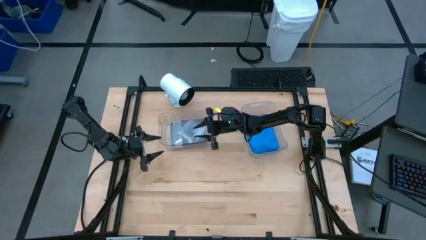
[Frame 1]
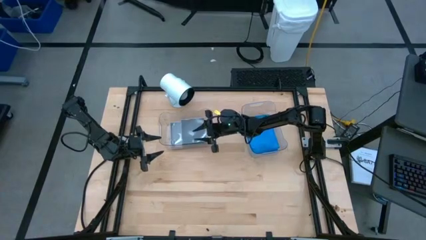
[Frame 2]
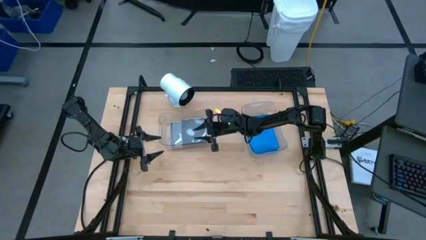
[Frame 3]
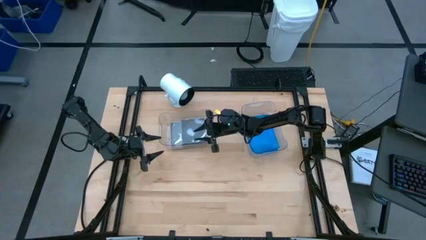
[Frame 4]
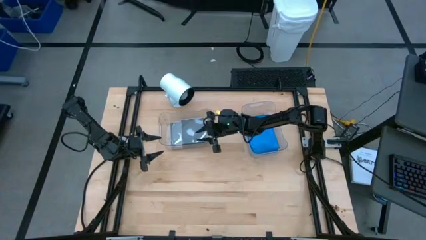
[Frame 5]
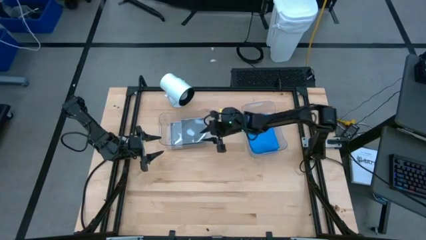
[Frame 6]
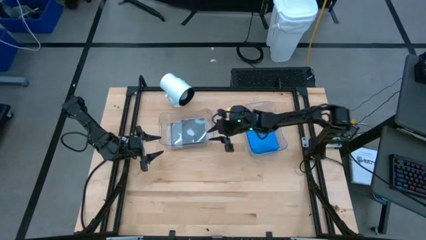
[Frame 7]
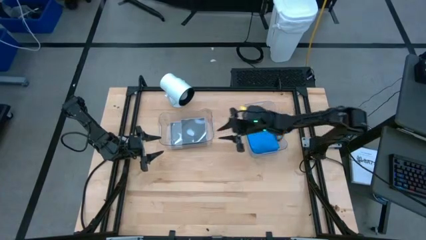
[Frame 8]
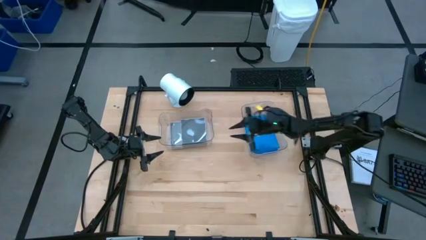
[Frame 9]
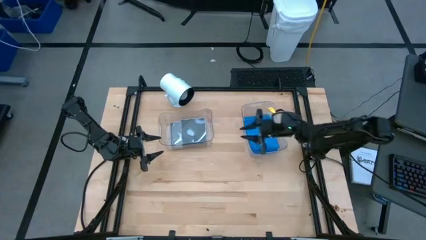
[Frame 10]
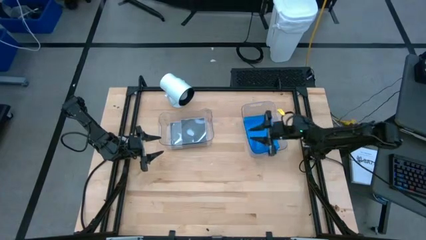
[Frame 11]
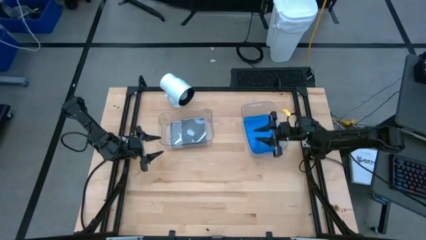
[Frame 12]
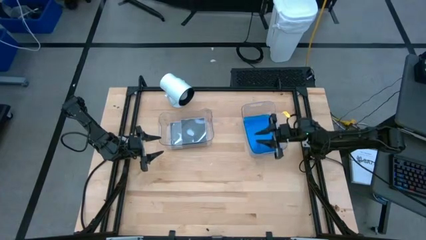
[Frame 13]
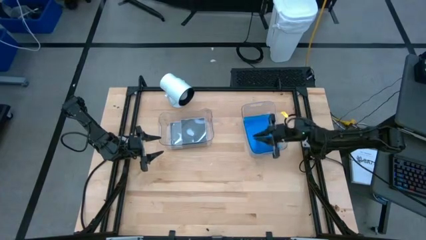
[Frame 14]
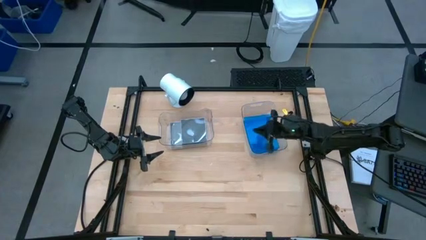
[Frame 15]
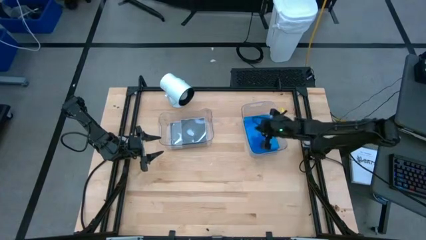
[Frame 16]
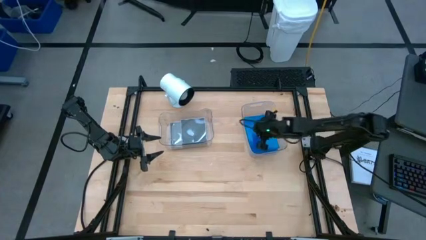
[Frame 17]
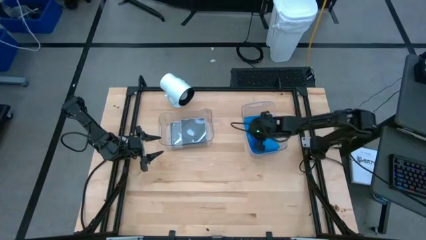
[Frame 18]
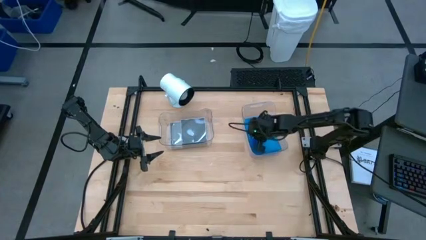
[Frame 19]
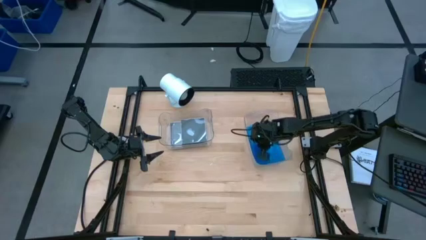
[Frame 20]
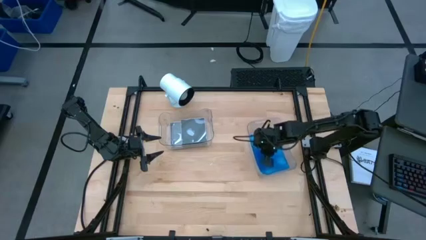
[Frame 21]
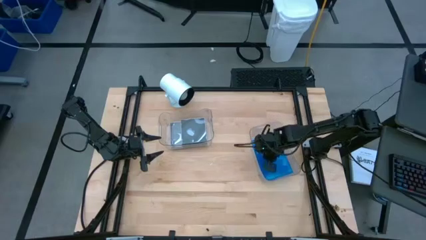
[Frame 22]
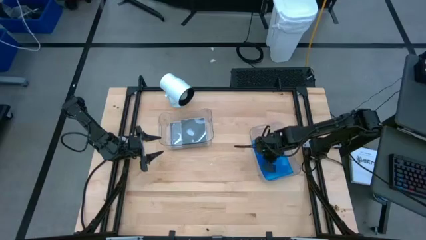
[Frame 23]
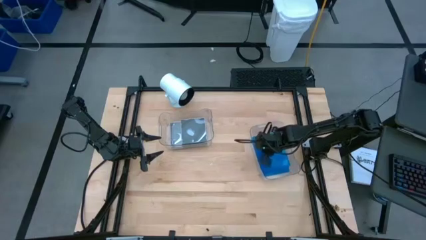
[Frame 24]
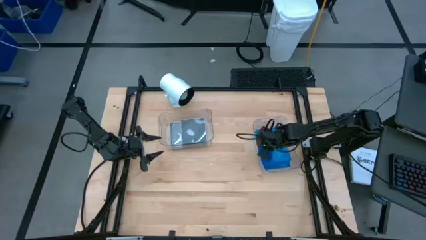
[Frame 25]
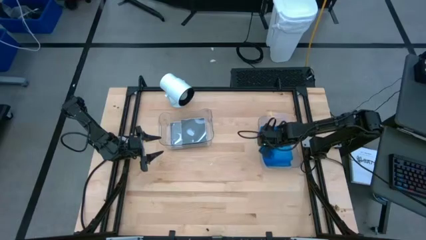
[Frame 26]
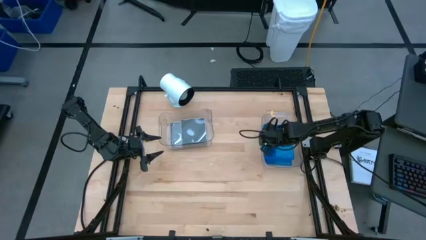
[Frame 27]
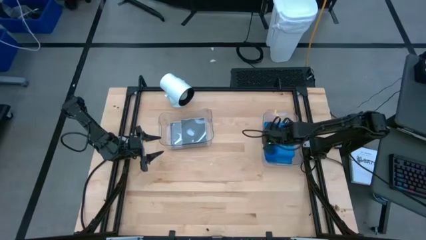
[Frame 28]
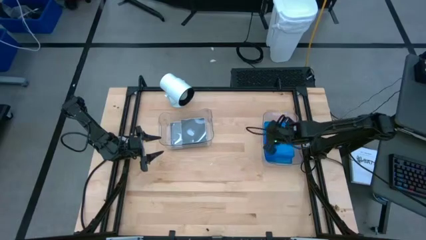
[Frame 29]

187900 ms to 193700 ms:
Task: Pick & place jewel cases by type
Move the right transparent bin to the right

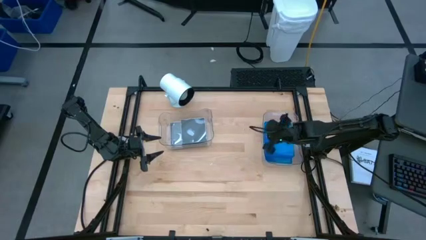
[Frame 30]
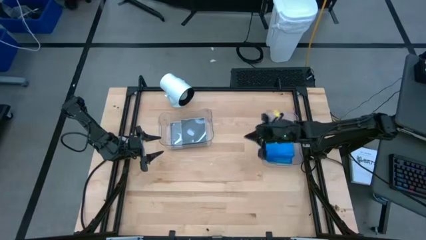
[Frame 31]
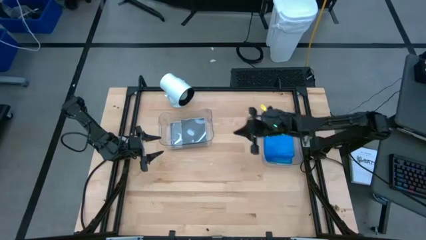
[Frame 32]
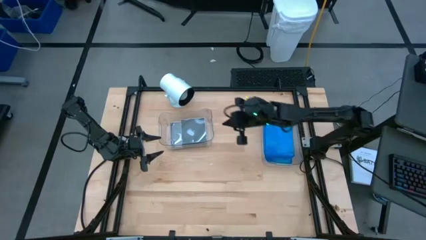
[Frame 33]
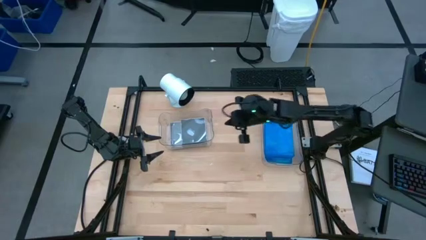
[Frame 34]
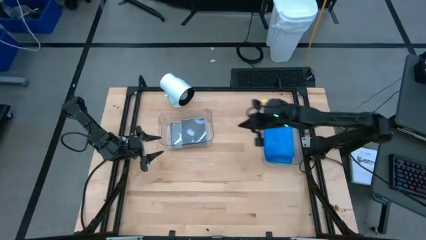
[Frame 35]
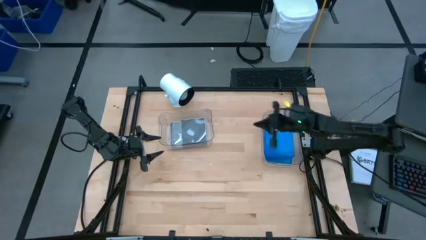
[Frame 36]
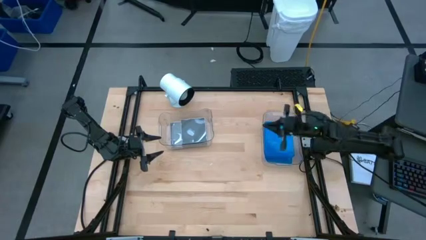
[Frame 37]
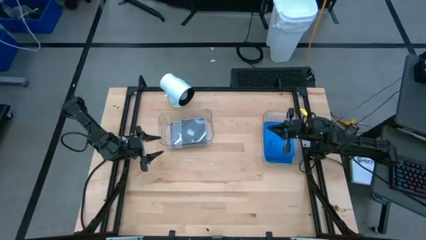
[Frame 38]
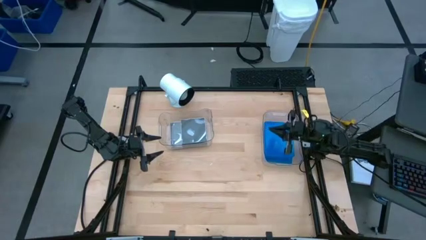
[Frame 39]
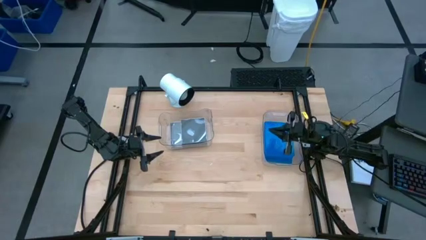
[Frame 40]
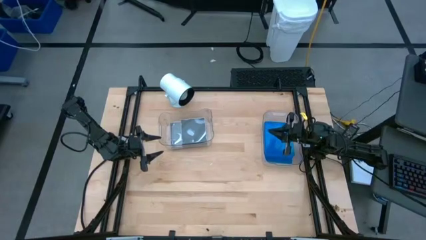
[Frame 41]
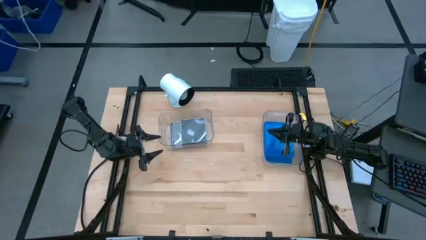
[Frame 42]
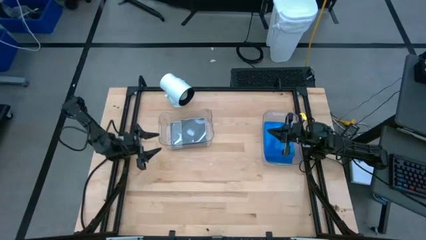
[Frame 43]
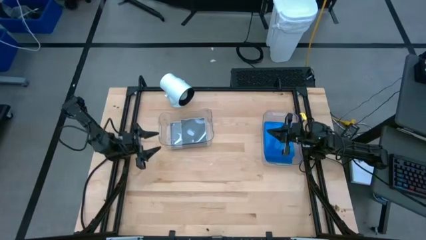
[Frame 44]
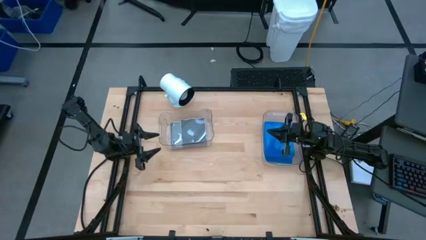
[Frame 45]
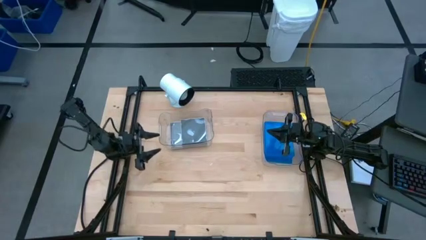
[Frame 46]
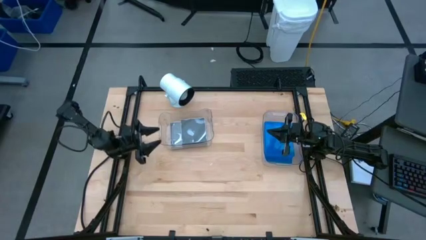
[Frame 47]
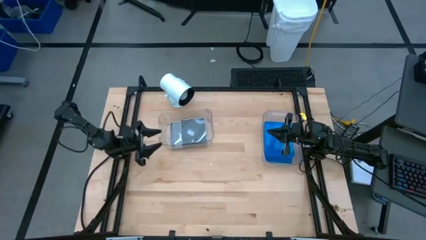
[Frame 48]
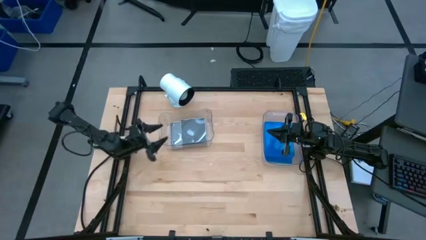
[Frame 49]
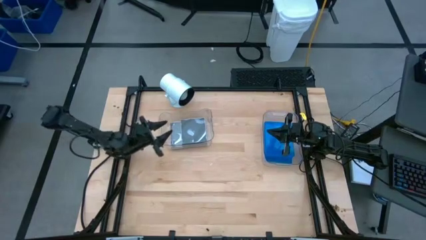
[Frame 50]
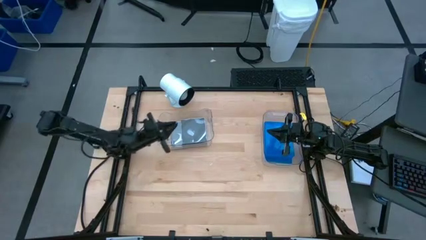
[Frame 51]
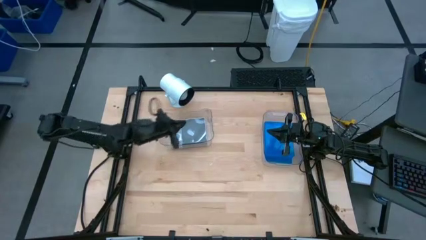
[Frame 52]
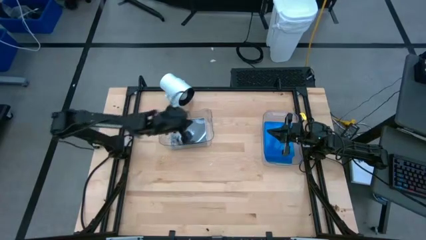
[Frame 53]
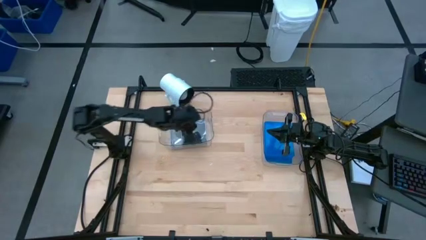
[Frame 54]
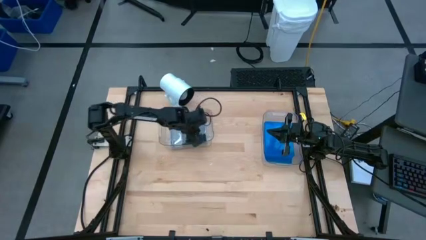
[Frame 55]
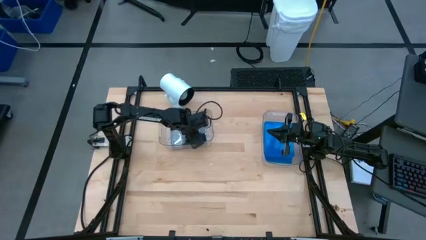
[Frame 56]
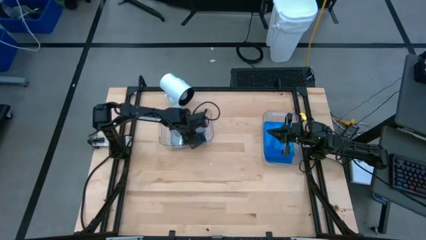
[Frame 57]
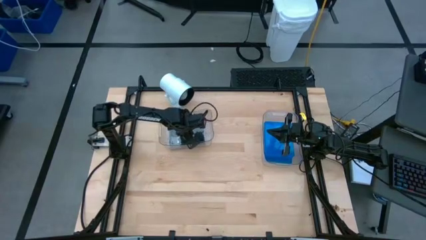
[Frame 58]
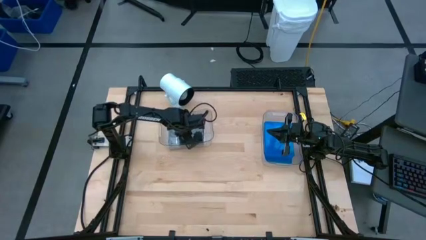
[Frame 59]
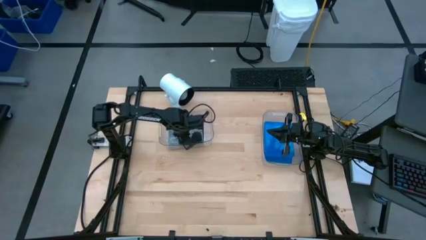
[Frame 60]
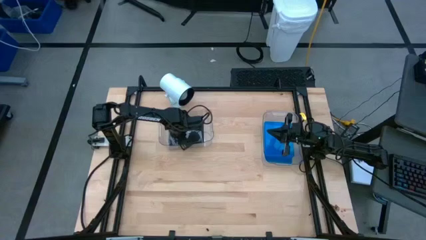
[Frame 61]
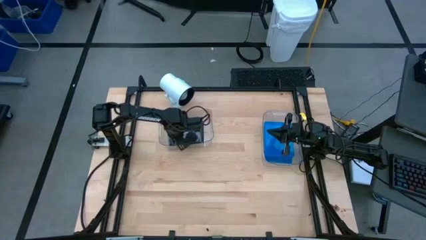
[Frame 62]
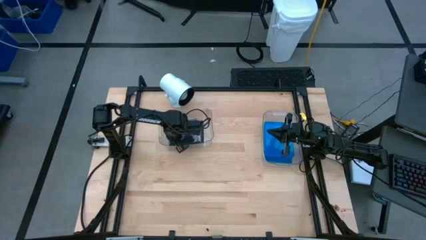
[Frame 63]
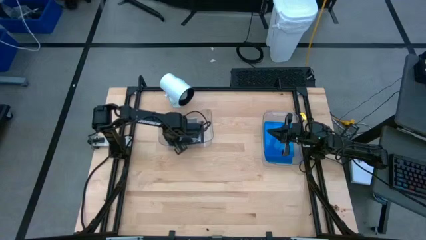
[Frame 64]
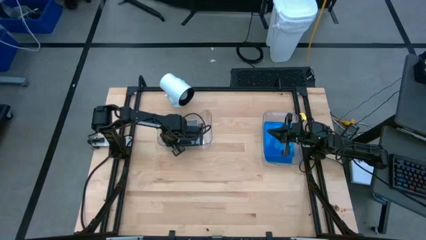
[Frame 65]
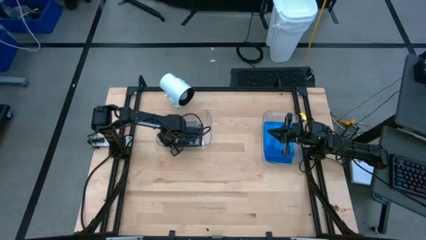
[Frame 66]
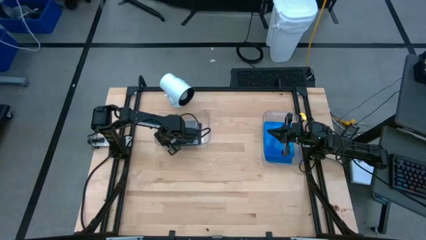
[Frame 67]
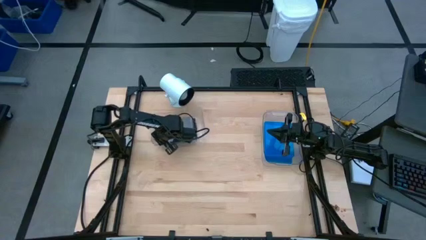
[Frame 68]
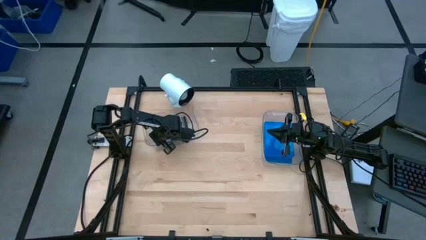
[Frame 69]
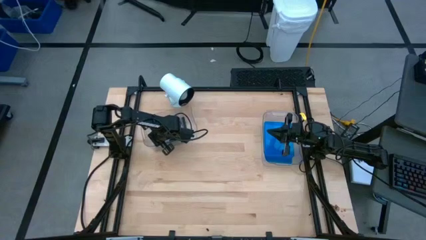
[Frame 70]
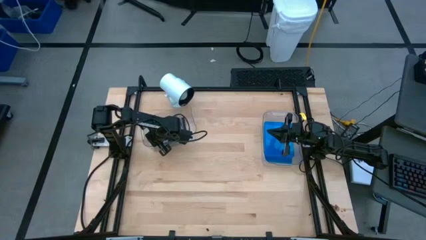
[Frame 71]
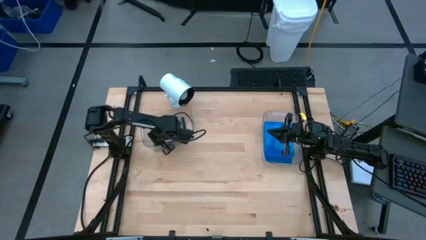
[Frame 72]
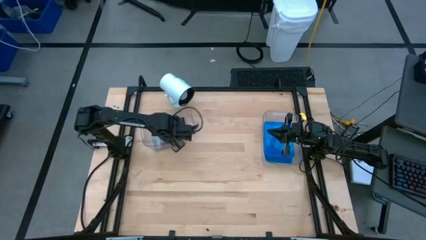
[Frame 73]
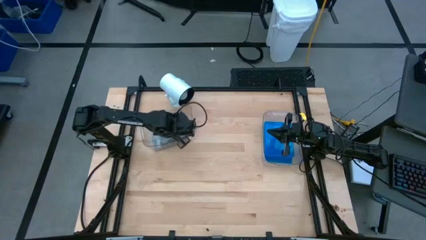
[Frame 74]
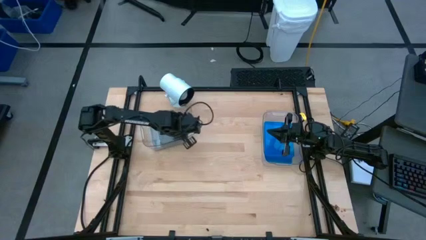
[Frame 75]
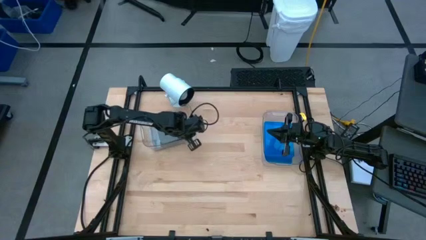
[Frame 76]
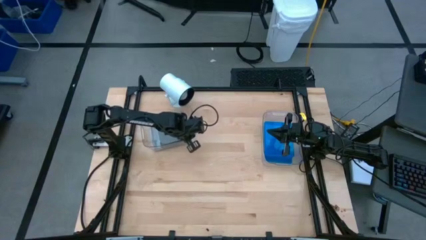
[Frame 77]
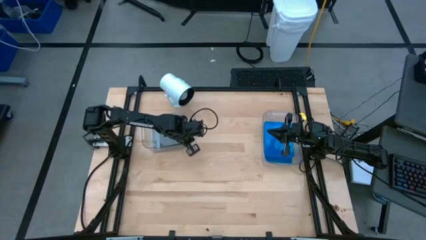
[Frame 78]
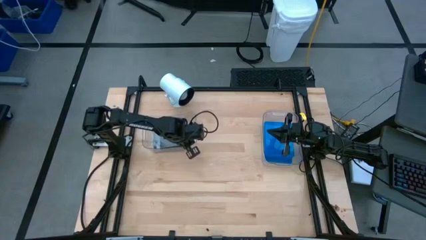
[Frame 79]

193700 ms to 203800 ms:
Move the left transparent bin to the left
